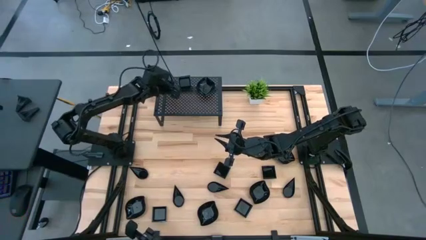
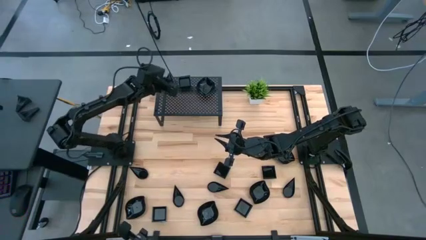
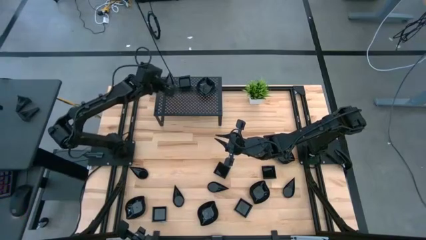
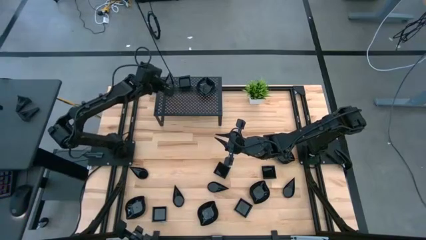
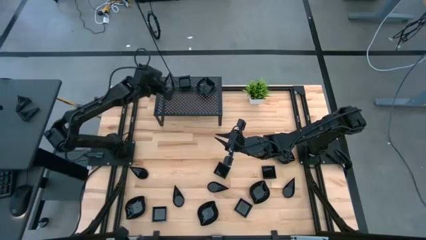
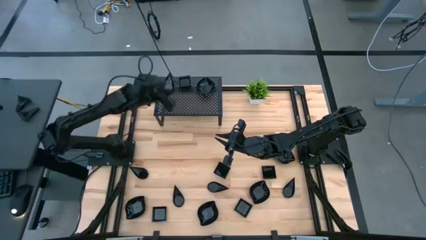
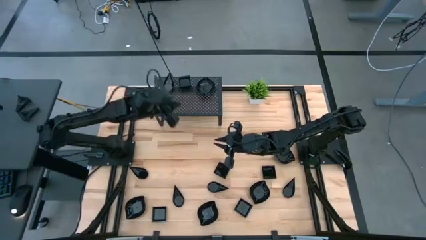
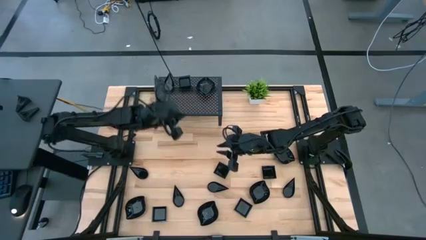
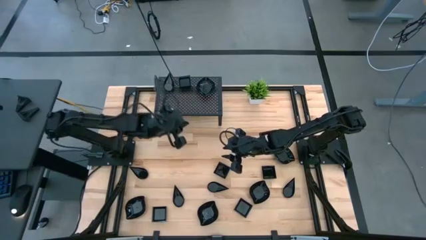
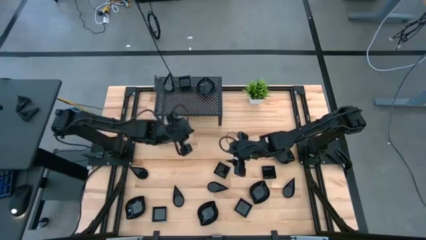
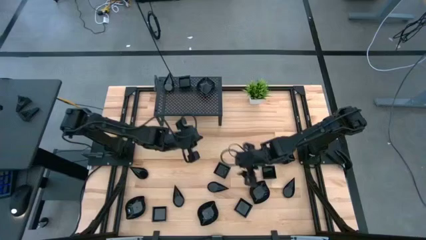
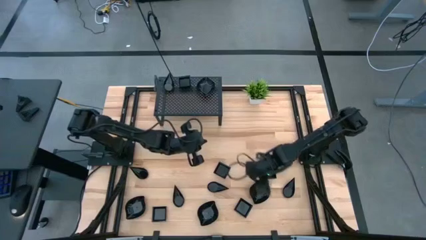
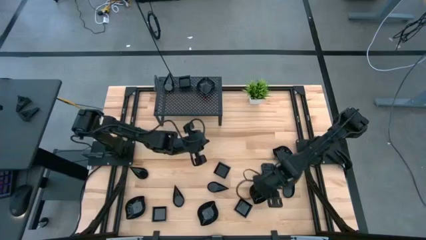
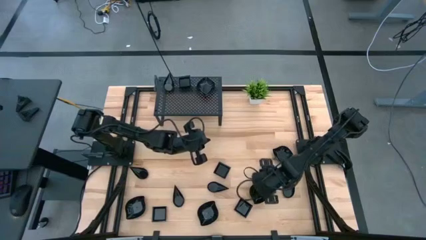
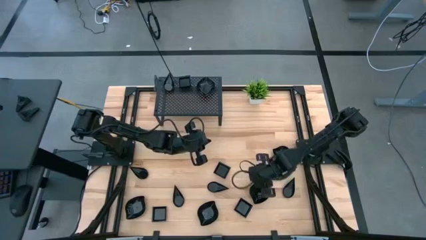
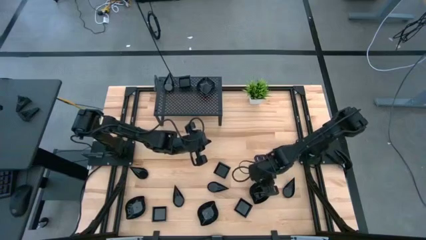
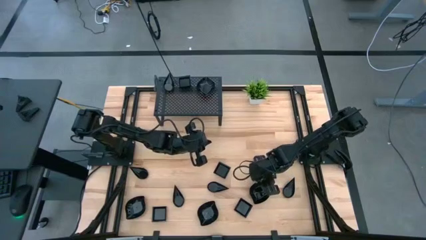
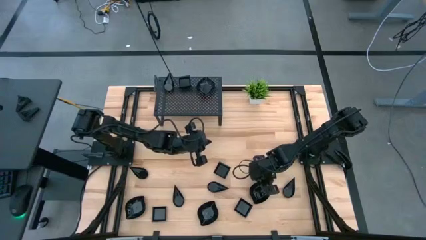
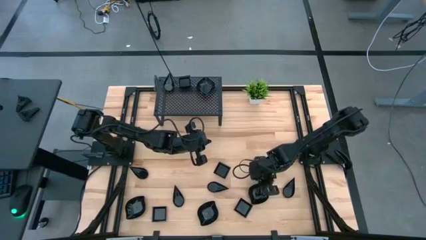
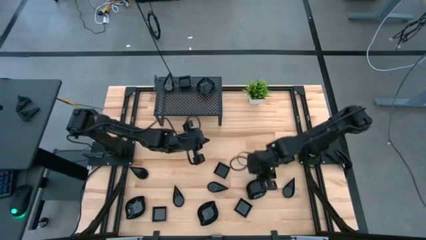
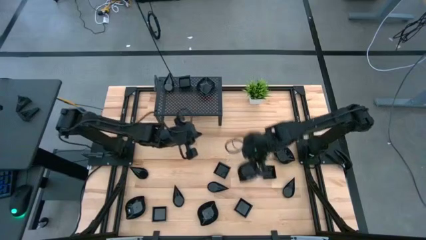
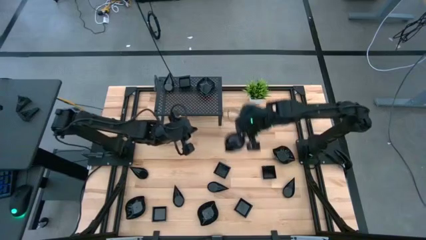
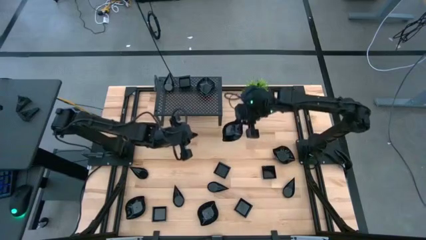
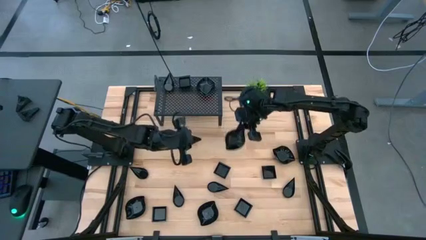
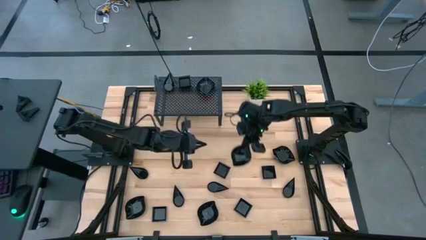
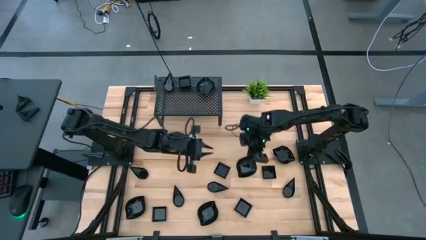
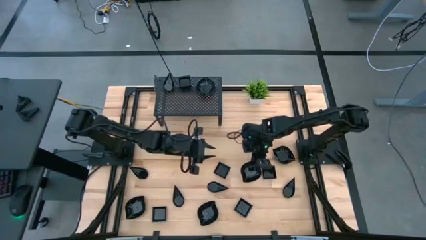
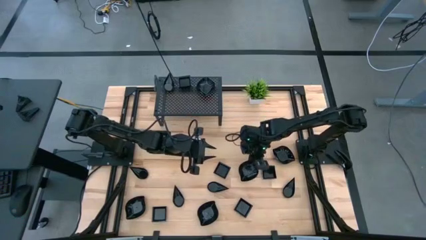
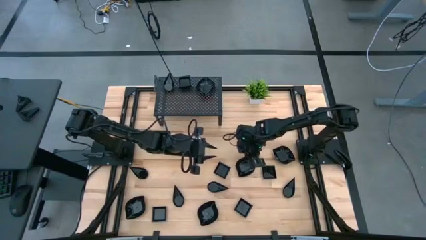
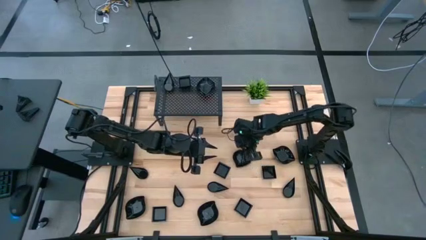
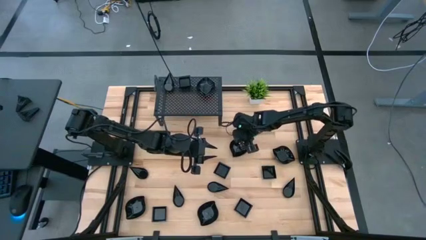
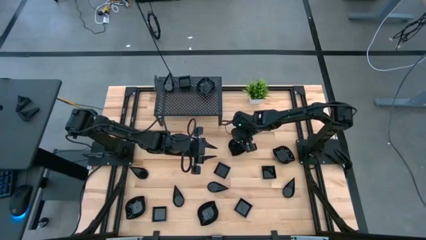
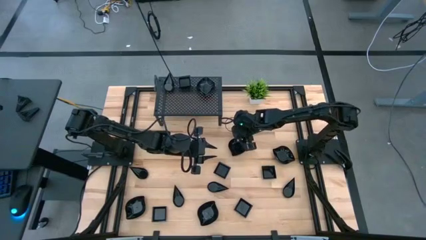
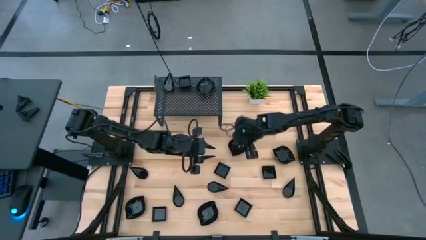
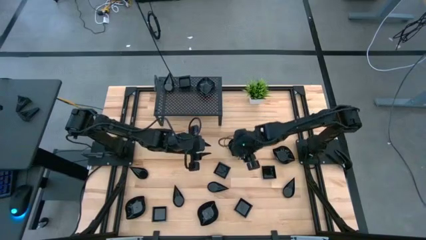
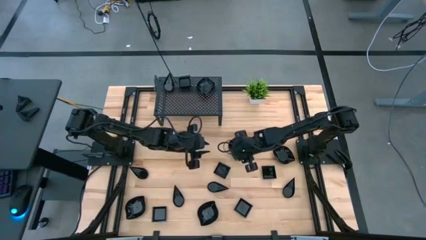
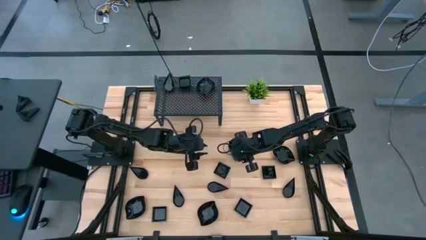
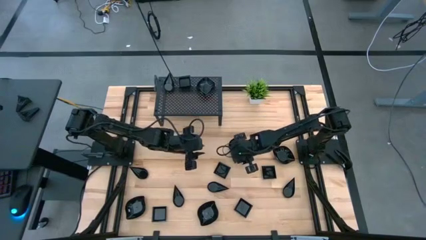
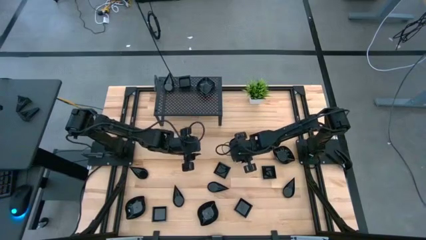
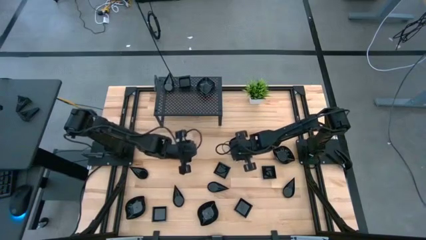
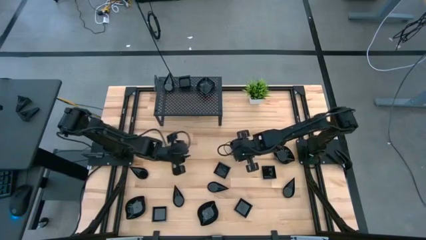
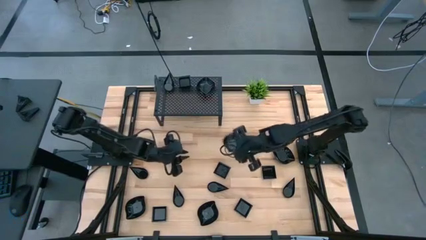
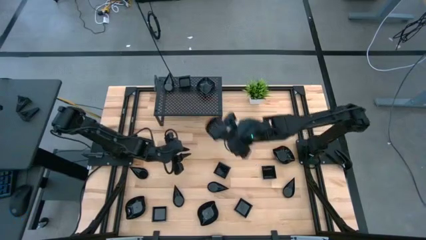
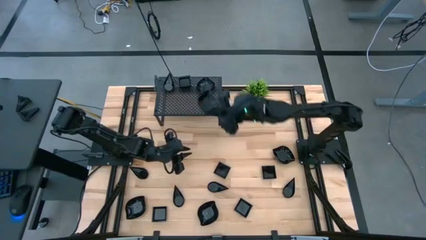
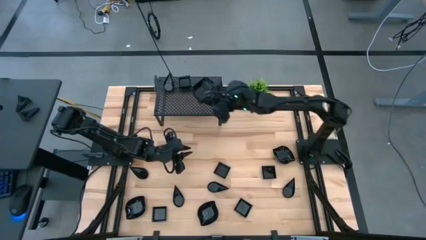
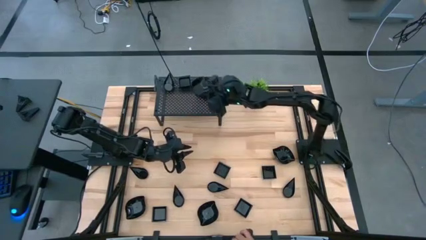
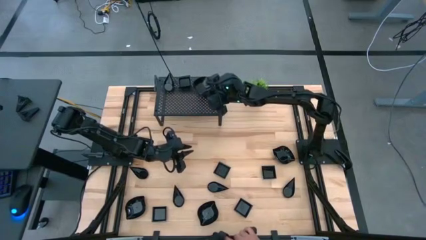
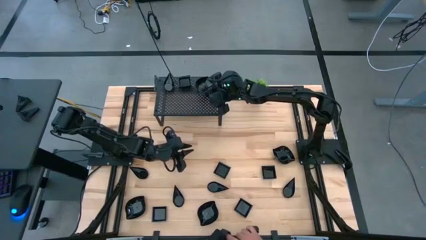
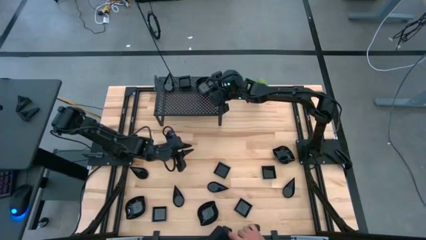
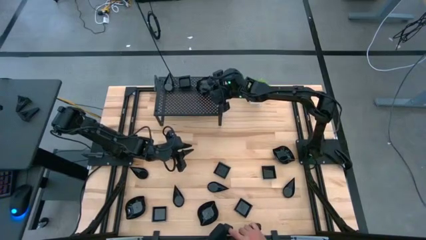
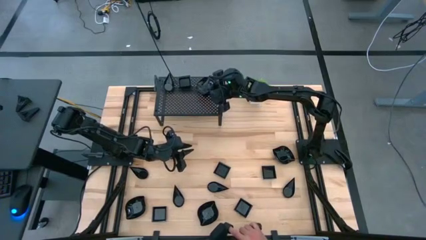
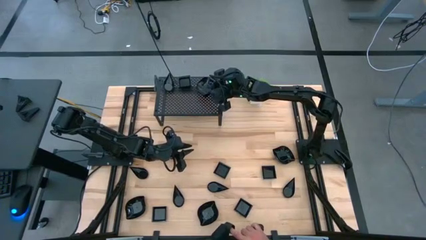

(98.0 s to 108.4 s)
Task: Pick & Place Mini shaped plates
Stack the black leaf-shaped plate on top of the leaf-shaped plate on the shelf

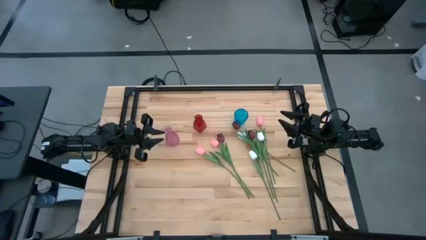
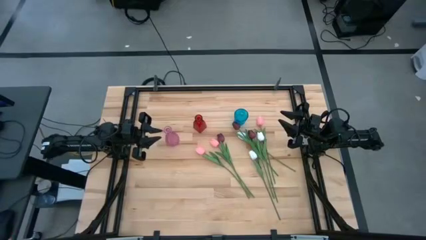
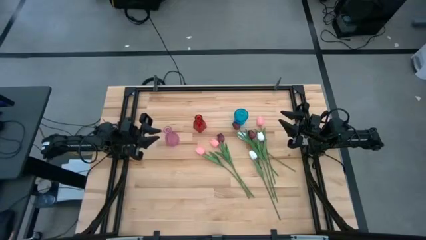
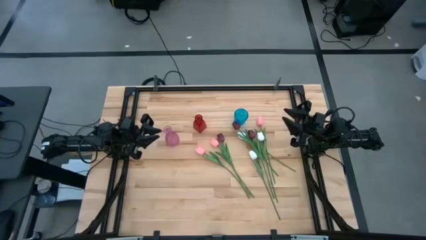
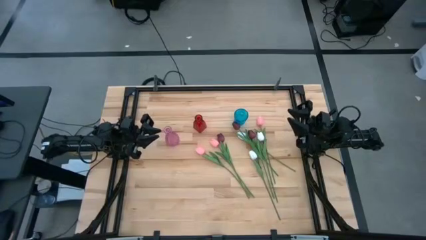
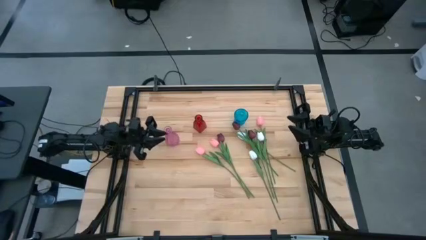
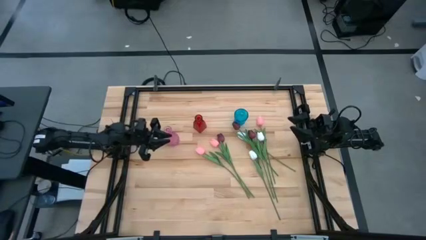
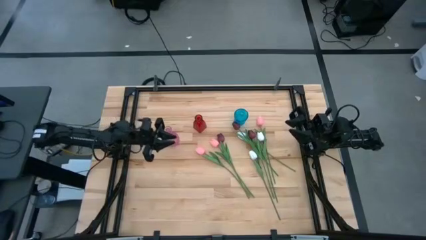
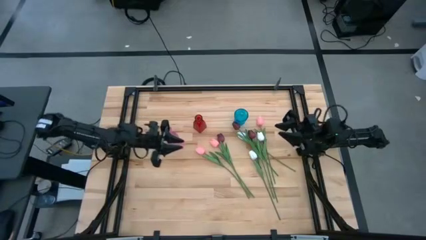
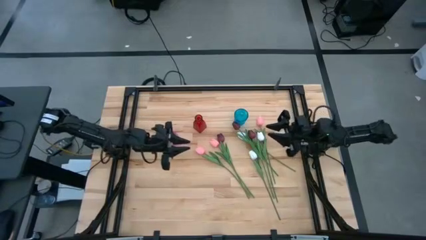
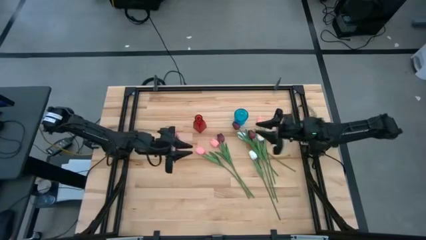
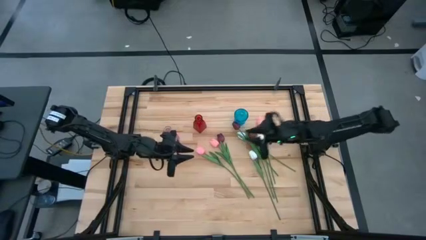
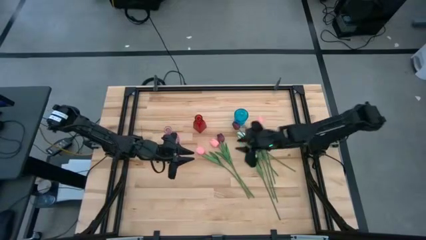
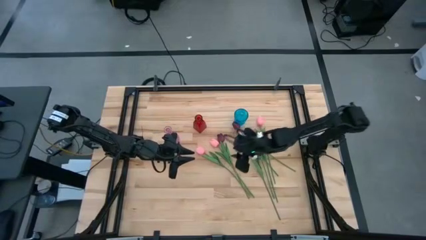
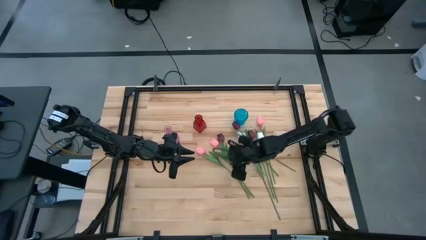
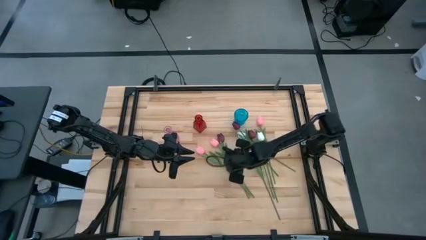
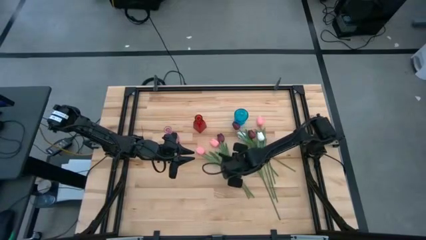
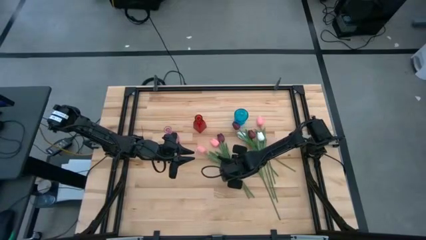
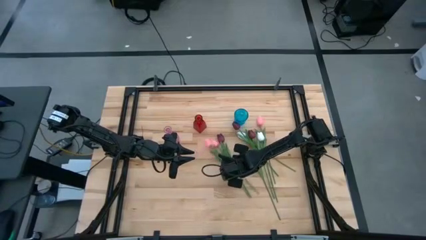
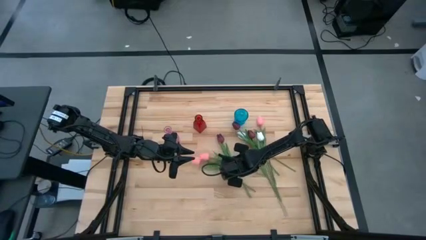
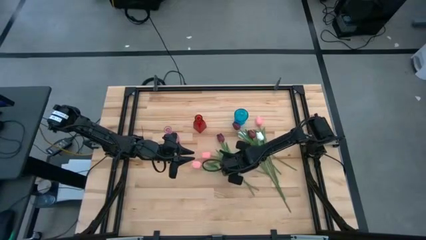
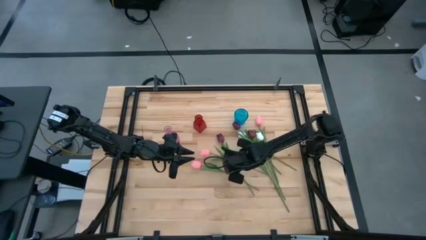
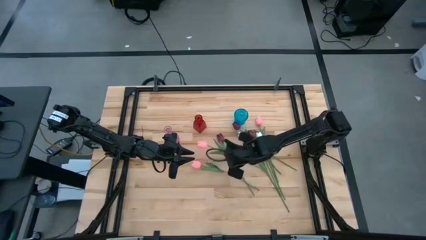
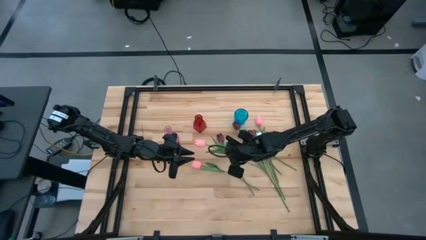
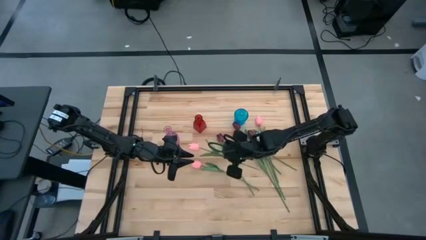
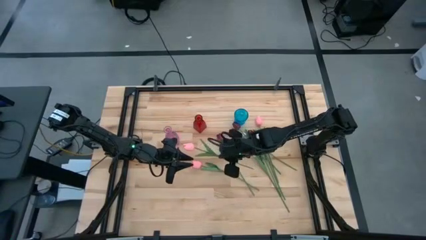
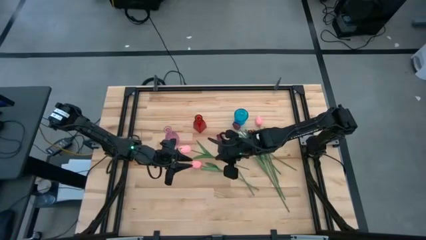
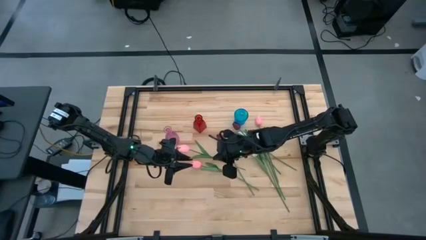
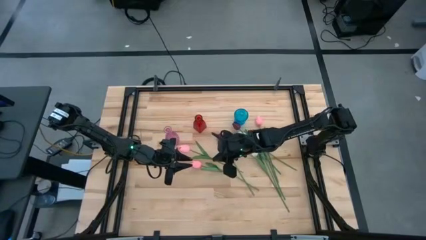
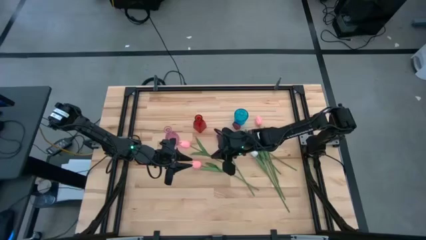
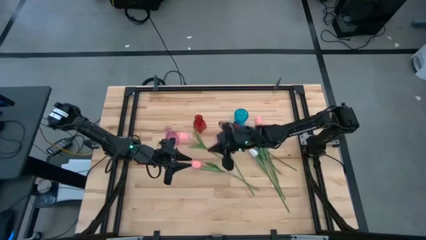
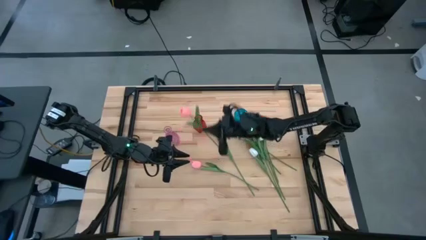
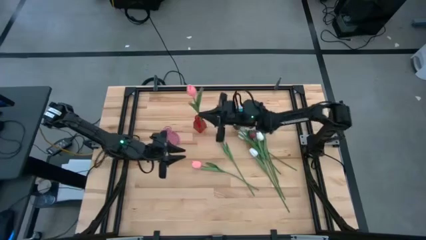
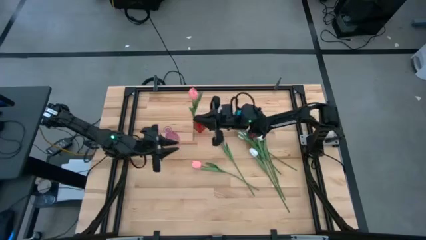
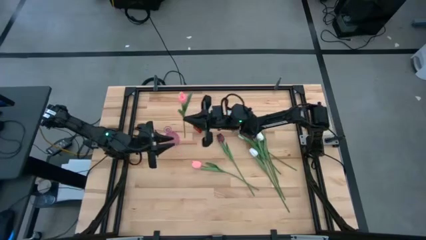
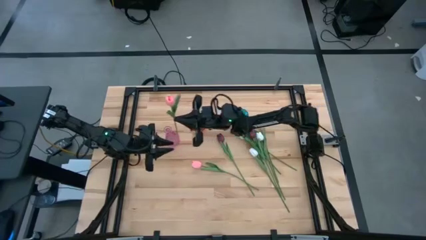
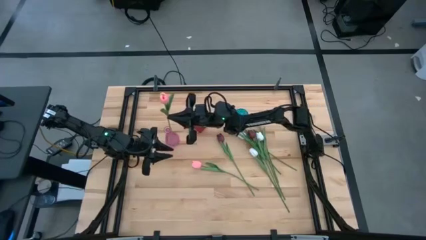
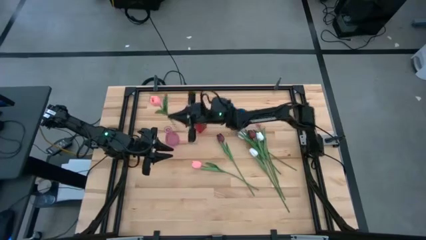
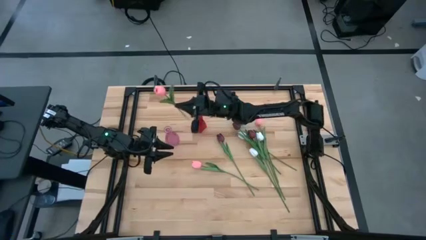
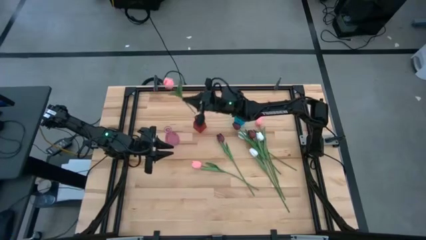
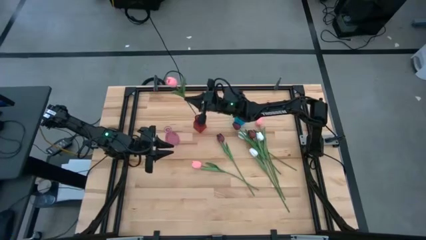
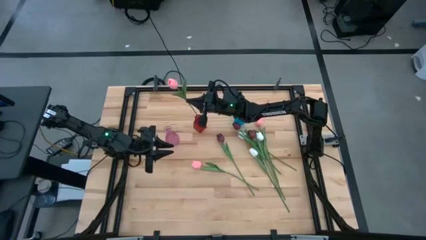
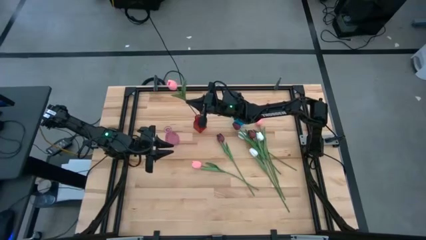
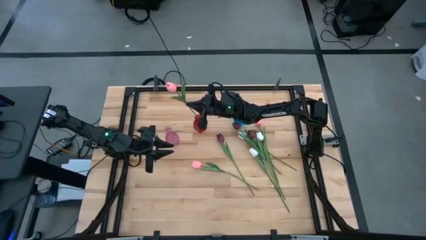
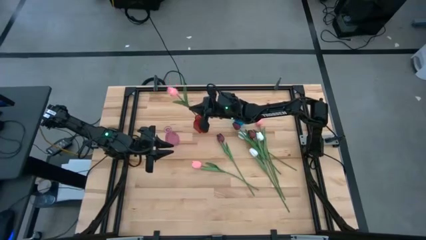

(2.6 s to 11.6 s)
Task: Sort flowers into vase by color
Put the middle pink tulip into the red vase
